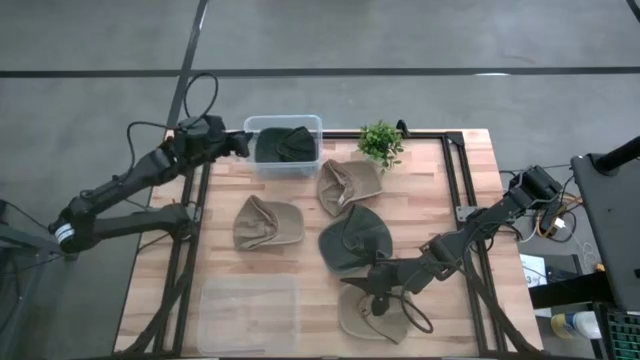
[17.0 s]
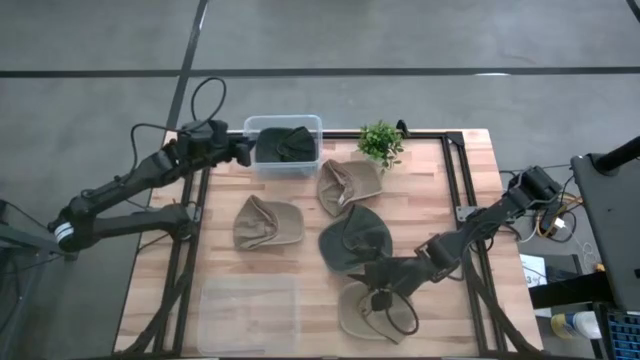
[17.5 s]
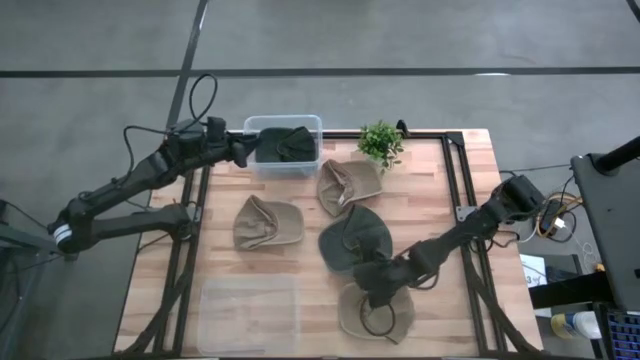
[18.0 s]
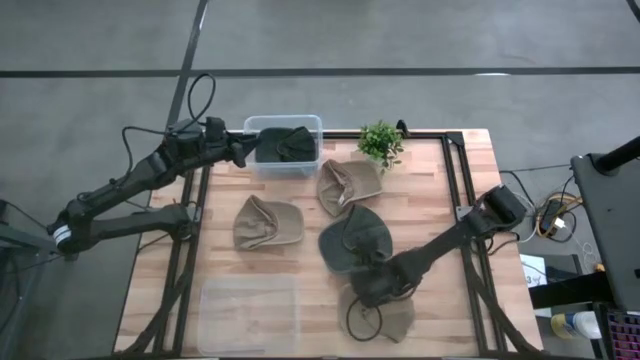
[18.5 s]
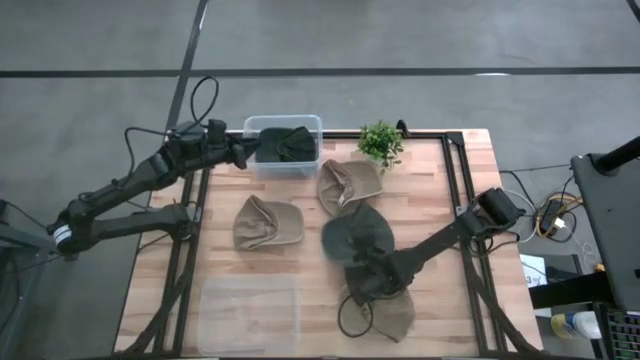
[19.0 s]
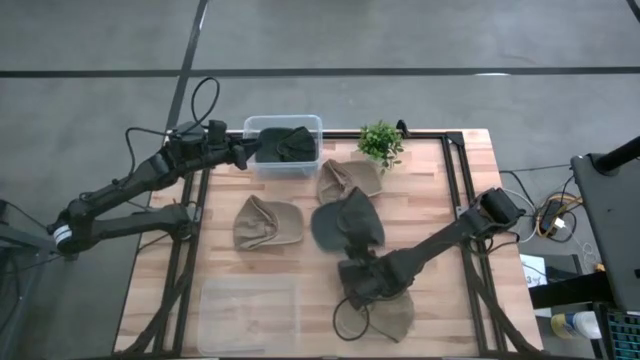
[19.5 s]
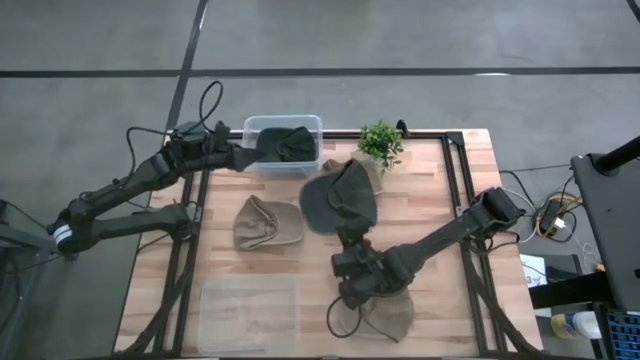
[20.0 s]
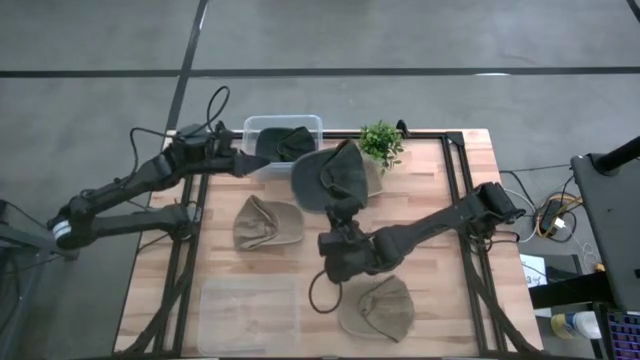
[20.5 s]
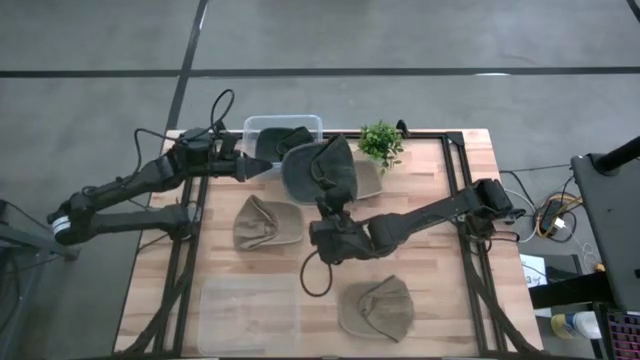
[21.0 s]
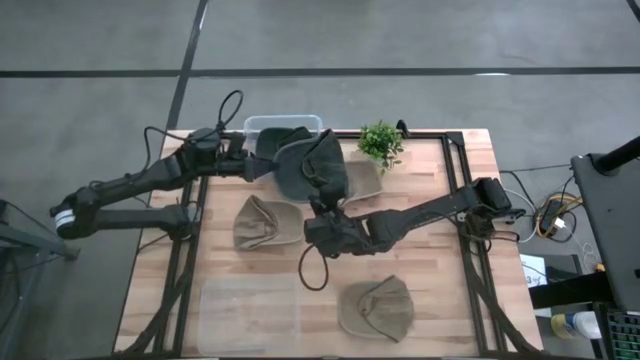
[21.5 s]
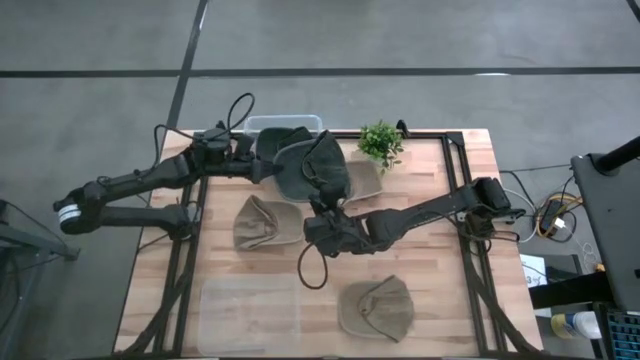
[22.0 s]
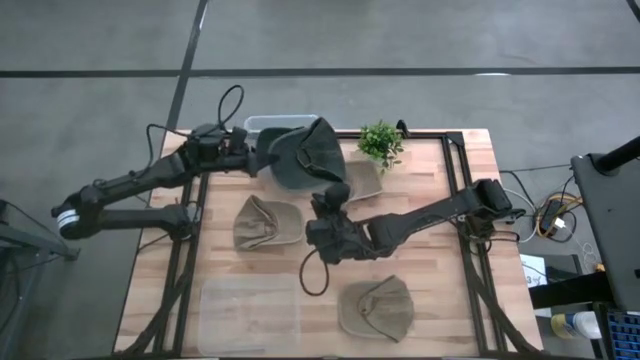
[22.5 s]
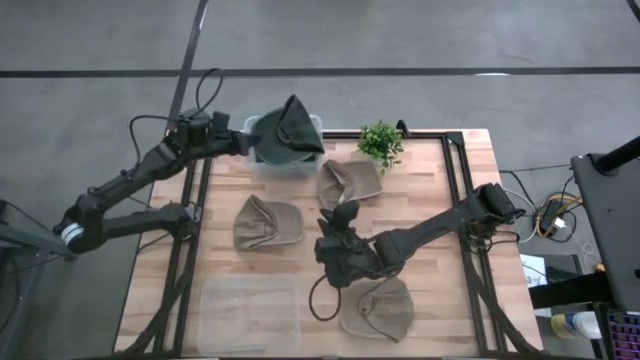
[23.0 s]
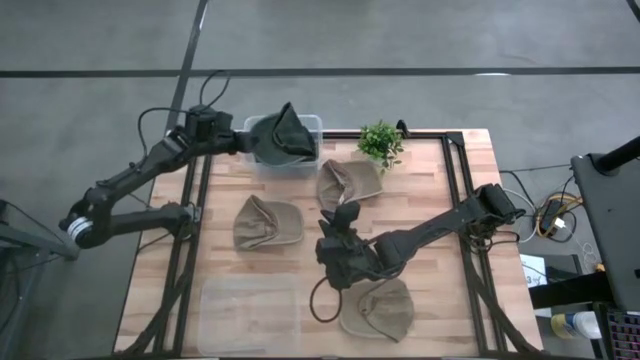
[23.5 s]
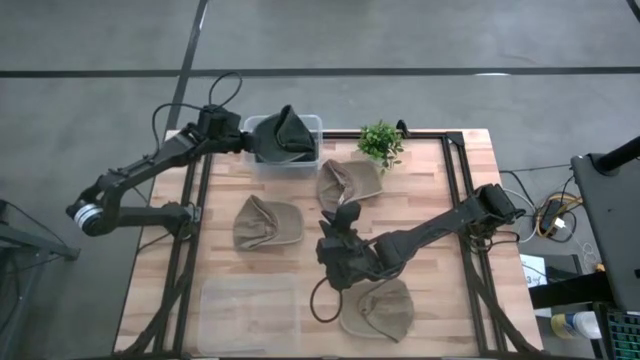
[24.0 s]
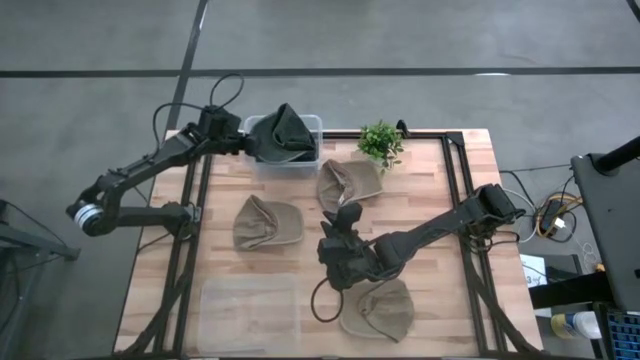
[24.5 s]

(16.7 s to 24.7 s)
Task: Pick & Place hat
Put the gray cap in the top transparent bin

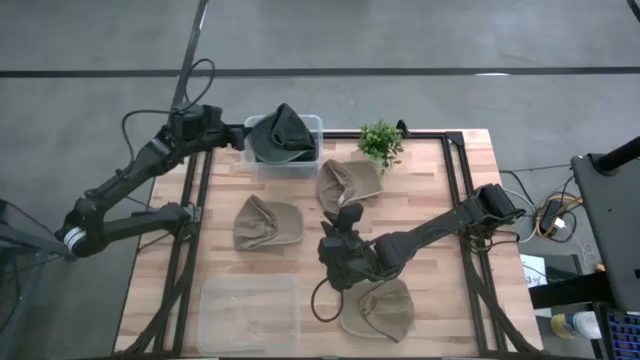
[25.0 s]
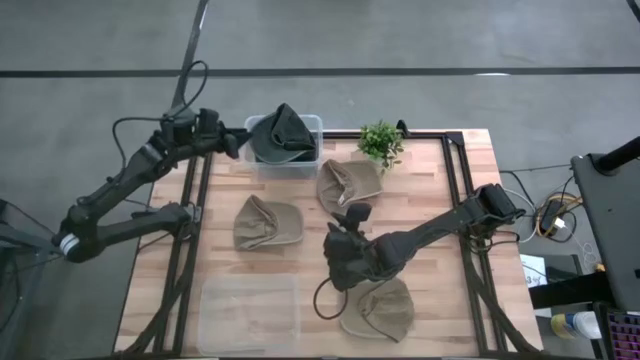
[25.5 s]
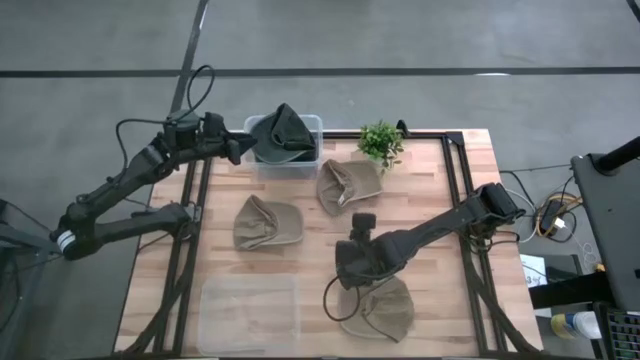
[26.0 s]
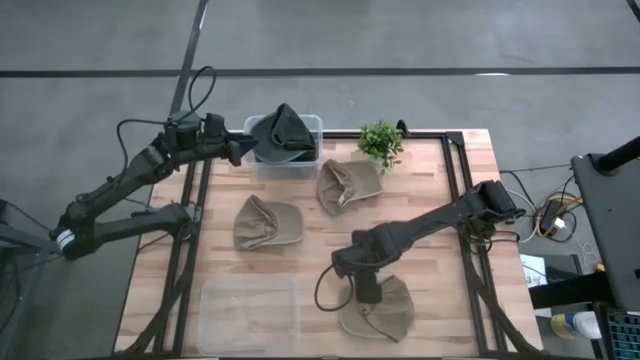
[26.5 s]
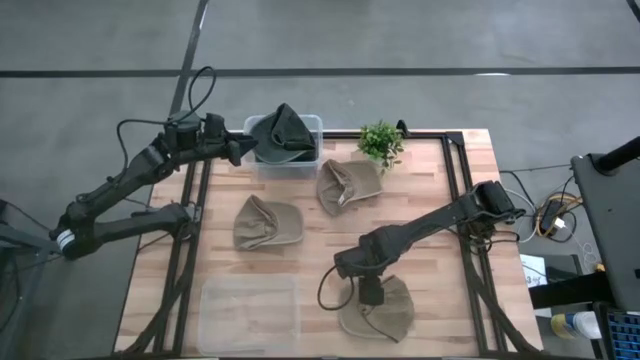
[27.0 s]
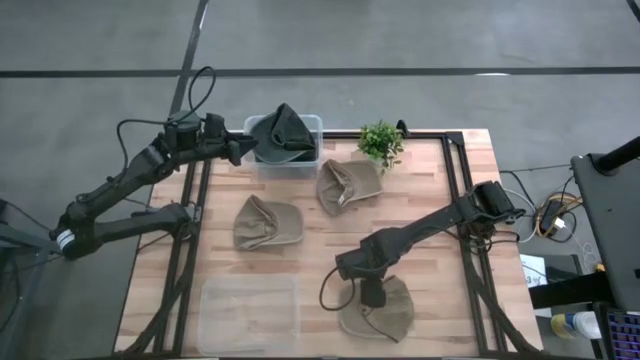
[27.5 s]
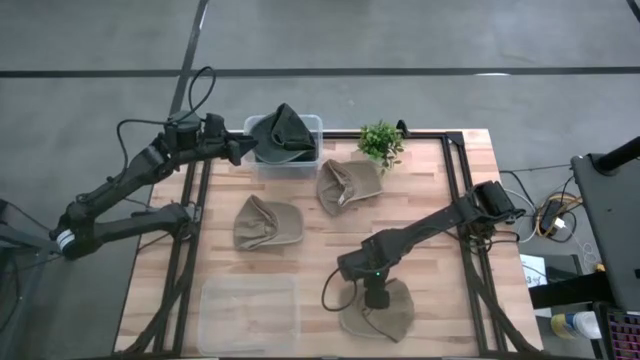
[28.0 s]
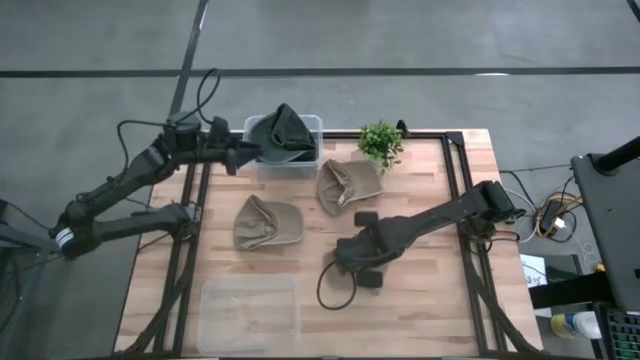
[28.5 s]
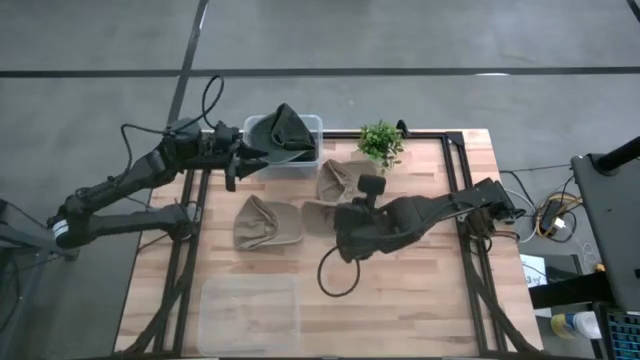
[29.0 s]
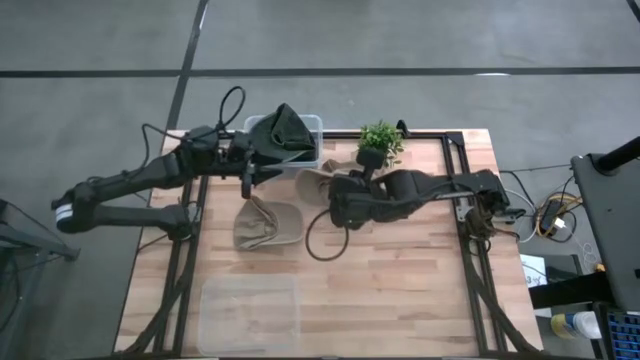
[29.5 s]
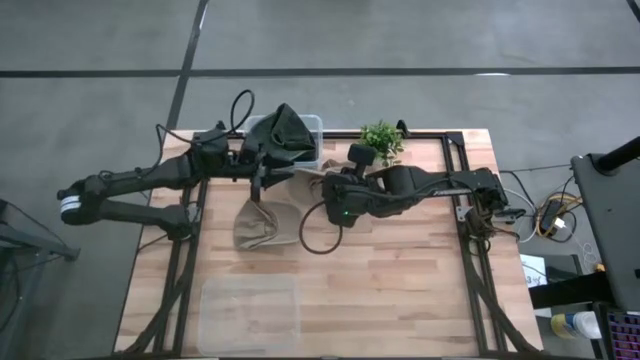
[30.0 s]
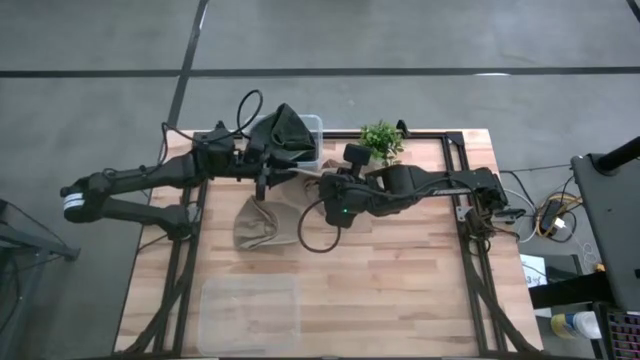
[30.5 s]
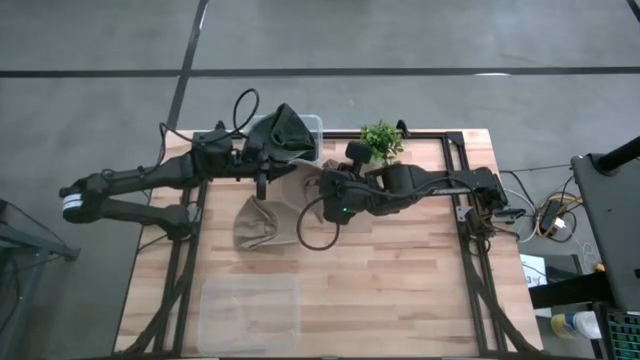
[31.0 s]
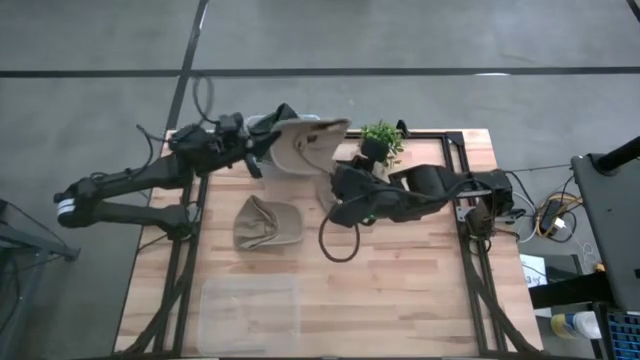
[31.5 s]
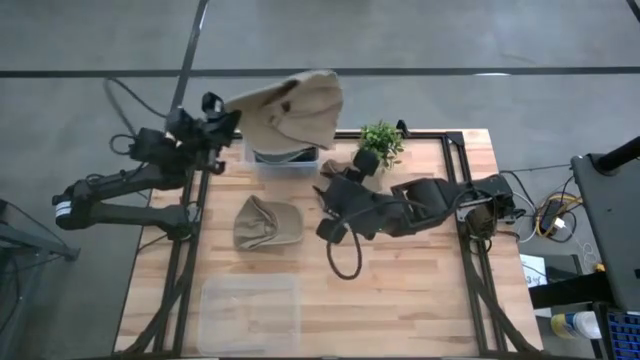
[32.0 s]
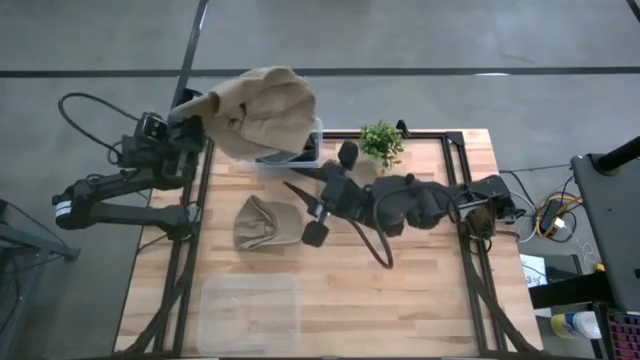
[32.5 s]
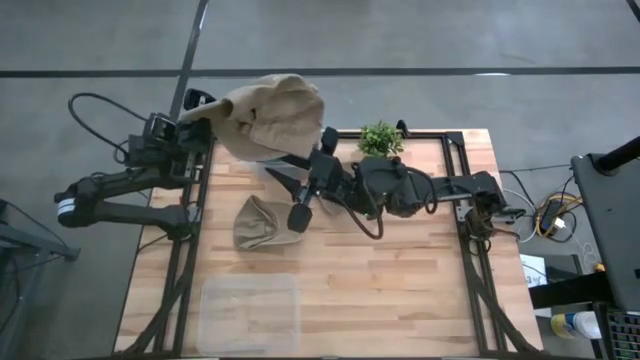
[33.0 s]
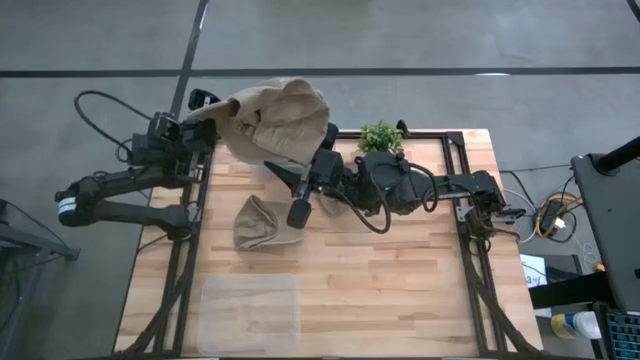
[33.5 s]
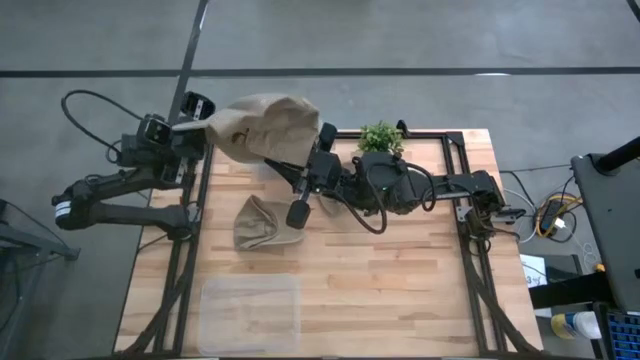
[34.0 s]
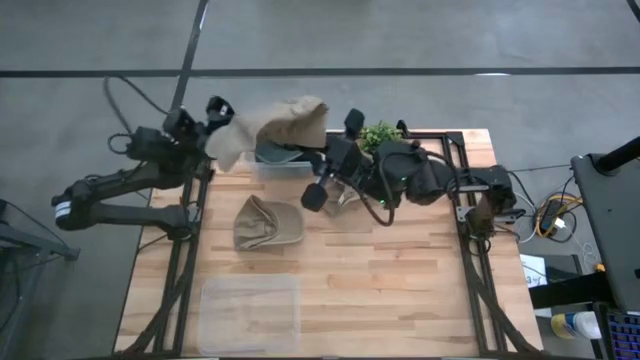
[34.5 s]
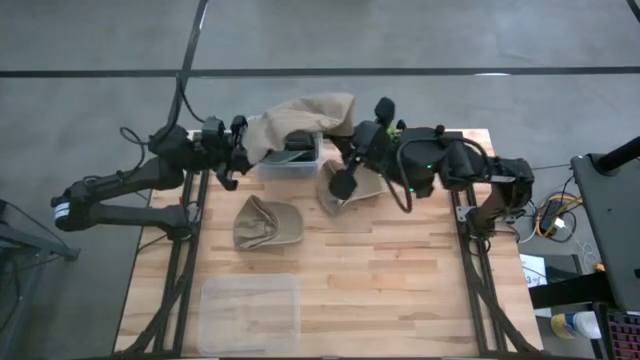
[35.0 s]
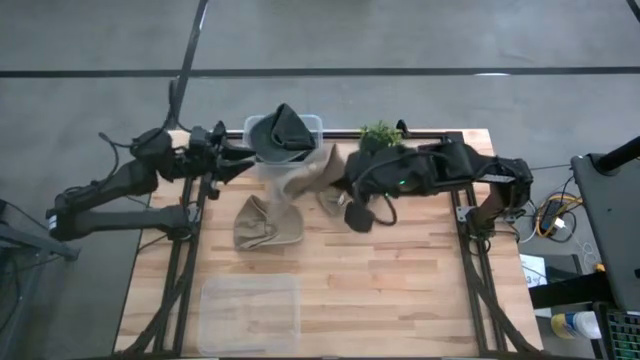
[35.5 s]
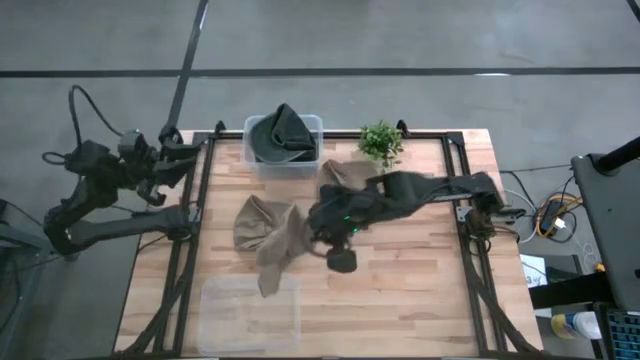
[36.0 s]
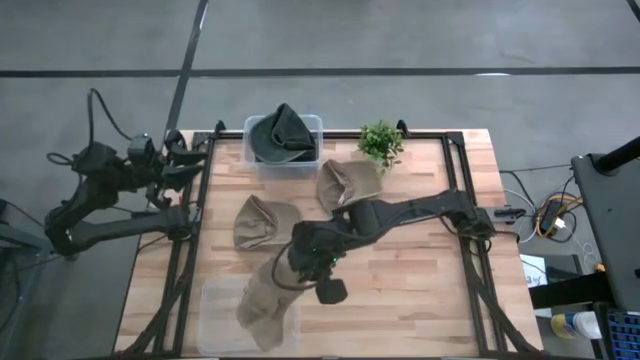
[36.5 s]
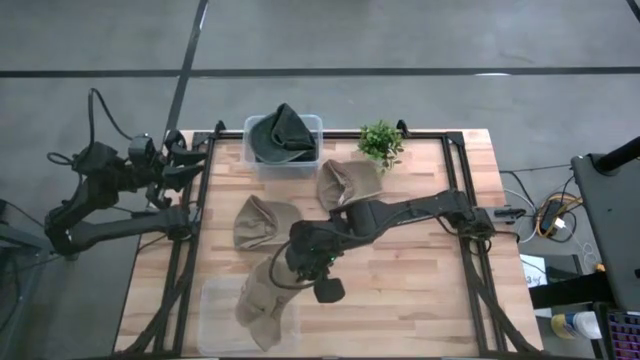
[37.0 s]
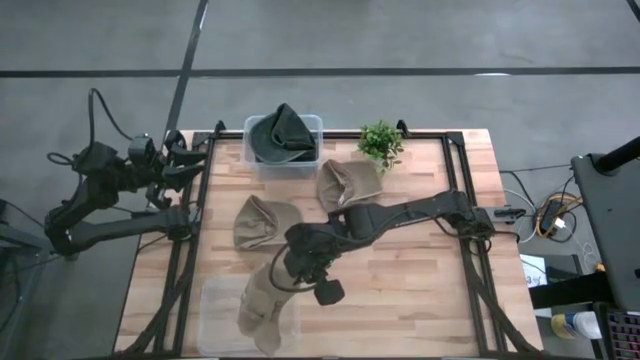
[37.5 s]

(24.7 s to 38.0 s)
Put the bottom brown cap in the bottom transparent bin
